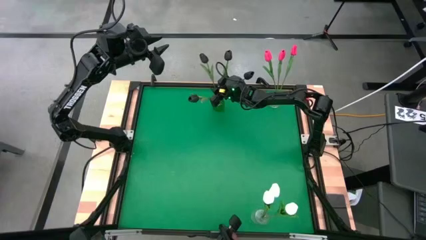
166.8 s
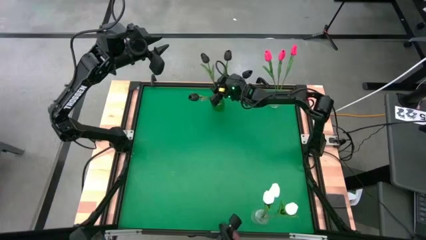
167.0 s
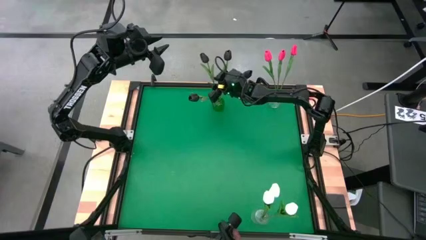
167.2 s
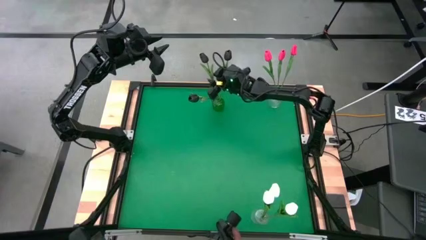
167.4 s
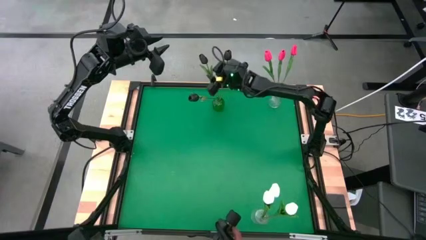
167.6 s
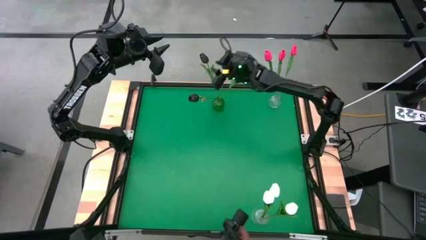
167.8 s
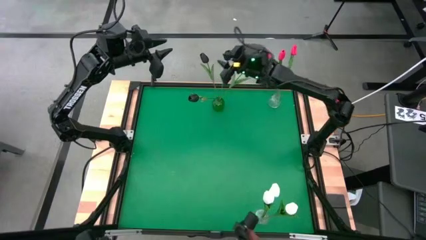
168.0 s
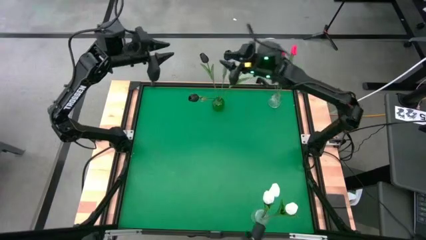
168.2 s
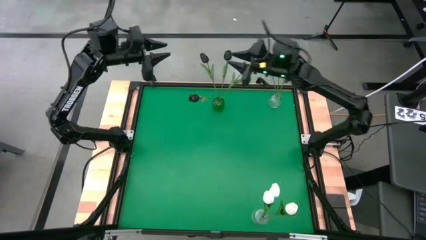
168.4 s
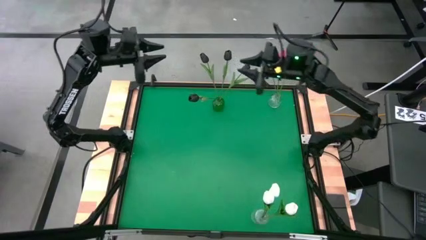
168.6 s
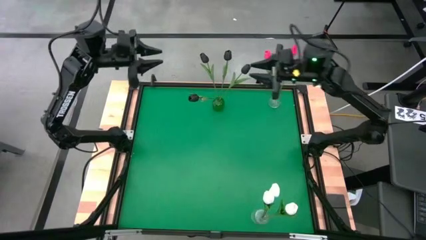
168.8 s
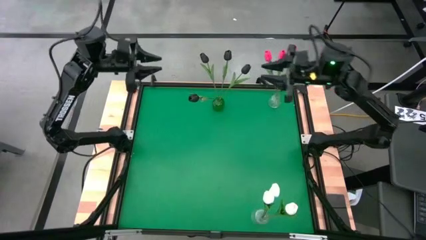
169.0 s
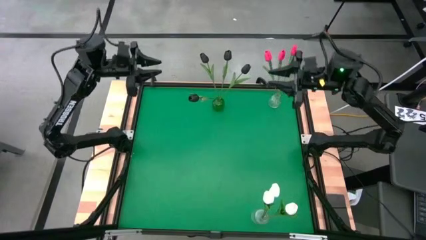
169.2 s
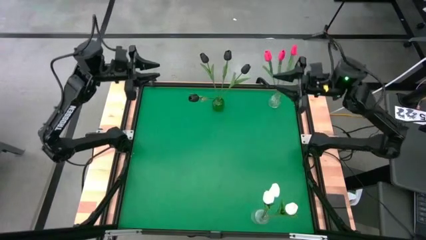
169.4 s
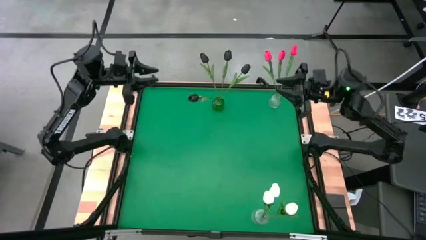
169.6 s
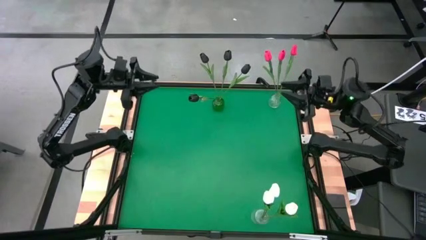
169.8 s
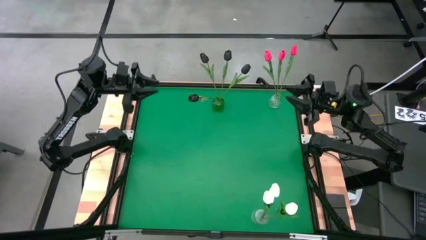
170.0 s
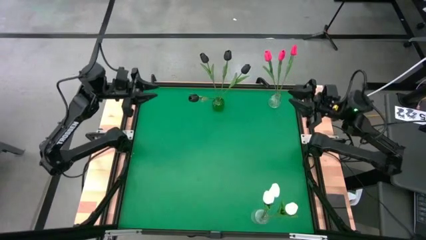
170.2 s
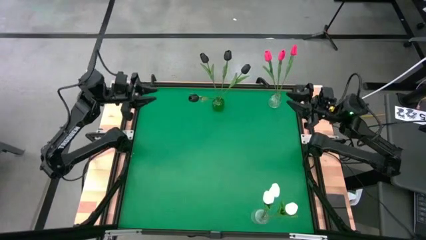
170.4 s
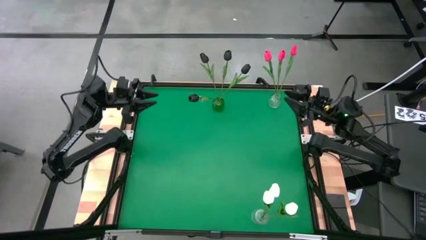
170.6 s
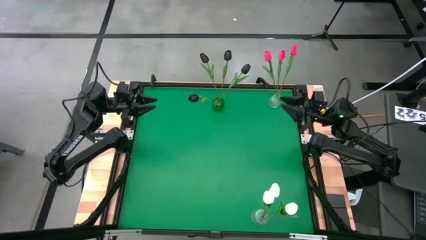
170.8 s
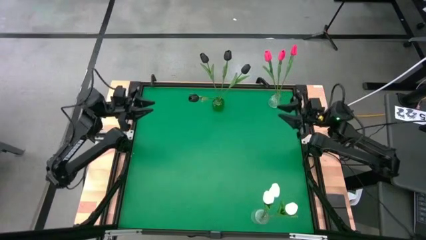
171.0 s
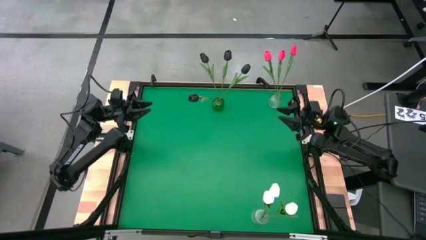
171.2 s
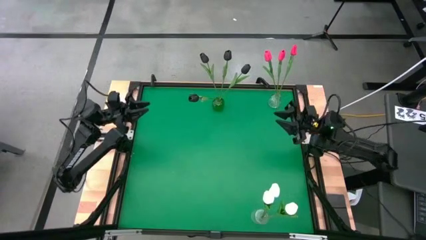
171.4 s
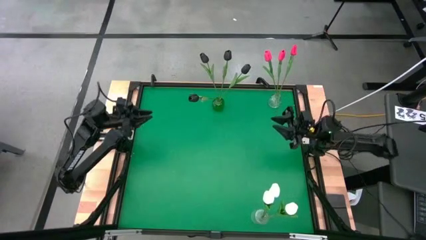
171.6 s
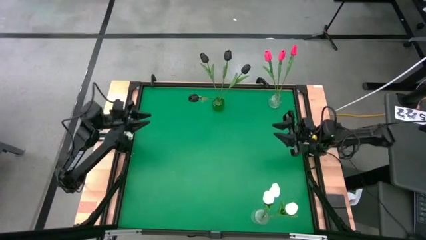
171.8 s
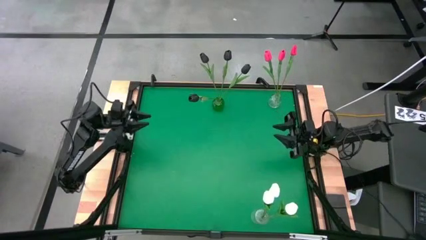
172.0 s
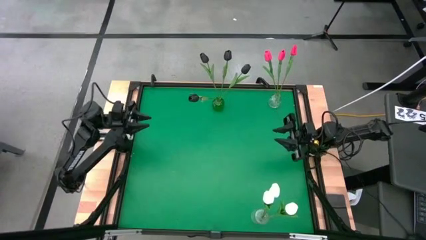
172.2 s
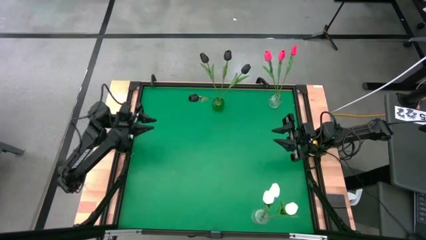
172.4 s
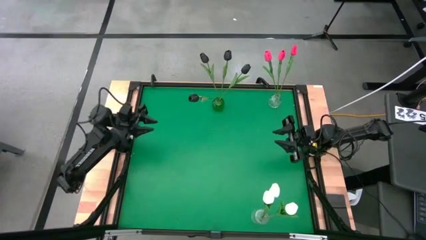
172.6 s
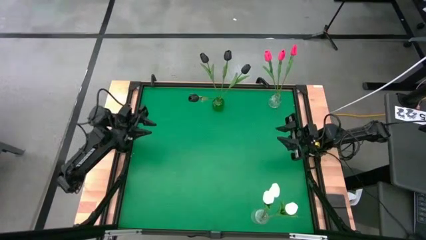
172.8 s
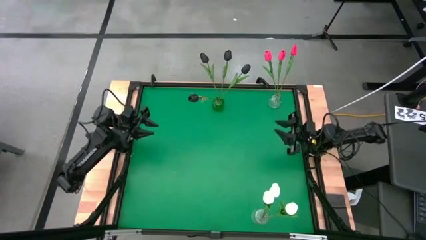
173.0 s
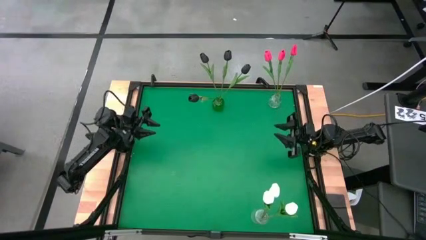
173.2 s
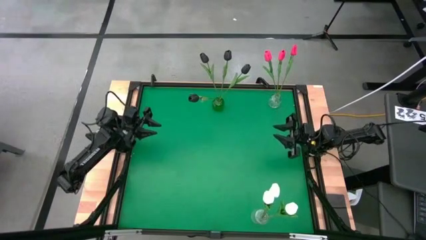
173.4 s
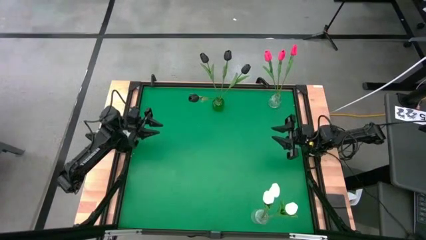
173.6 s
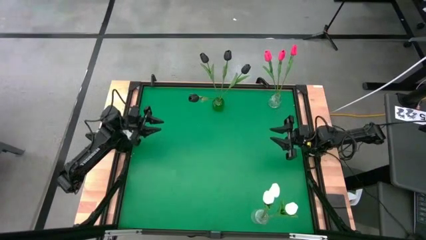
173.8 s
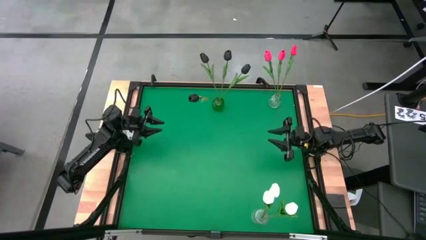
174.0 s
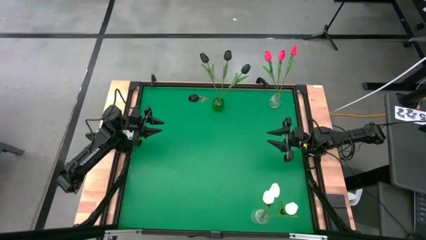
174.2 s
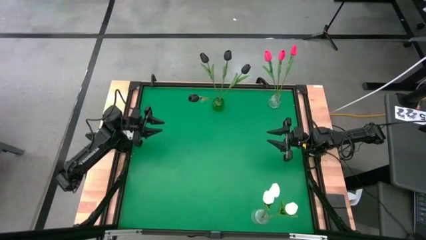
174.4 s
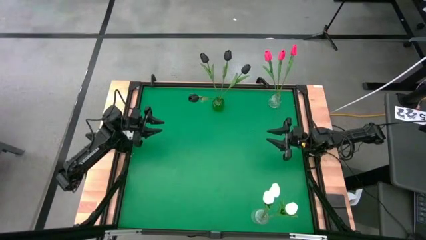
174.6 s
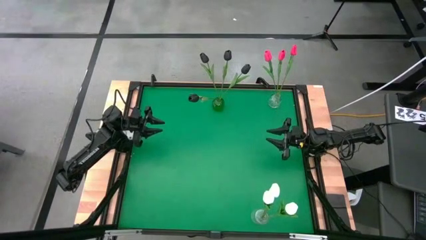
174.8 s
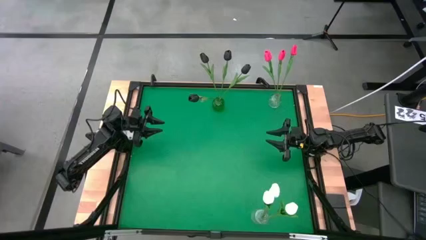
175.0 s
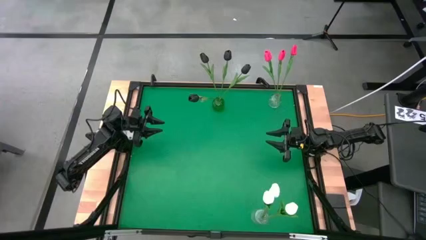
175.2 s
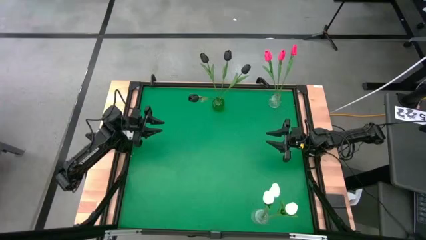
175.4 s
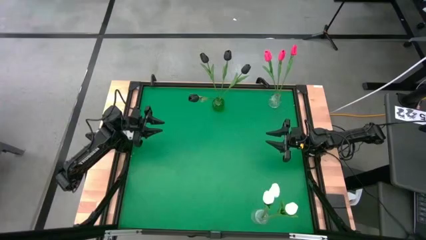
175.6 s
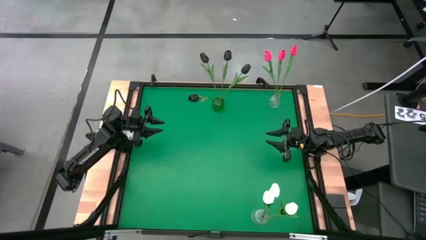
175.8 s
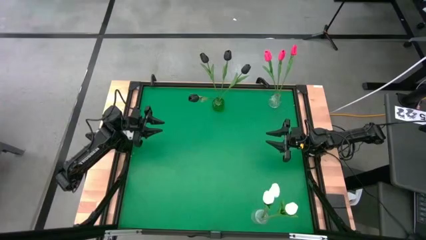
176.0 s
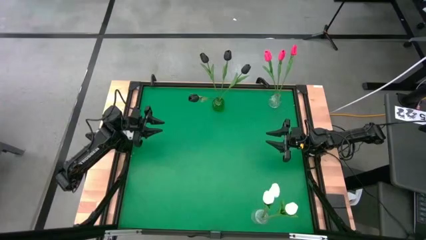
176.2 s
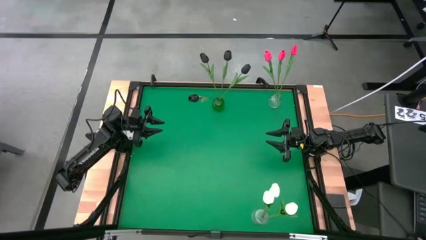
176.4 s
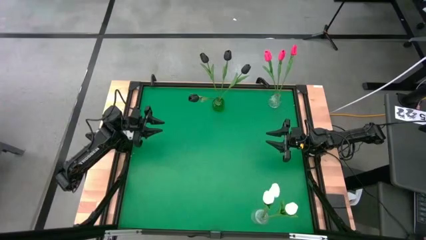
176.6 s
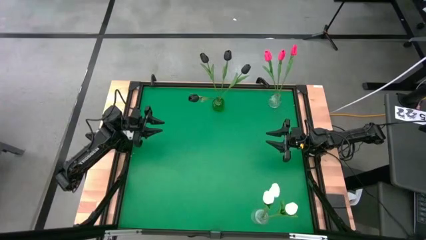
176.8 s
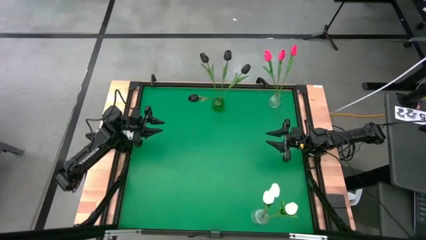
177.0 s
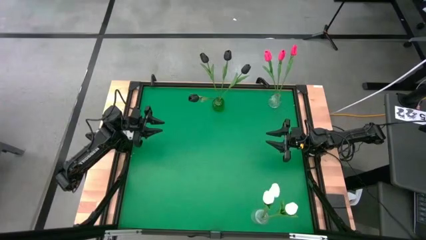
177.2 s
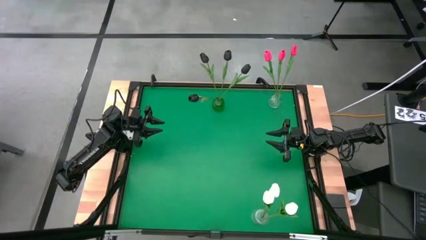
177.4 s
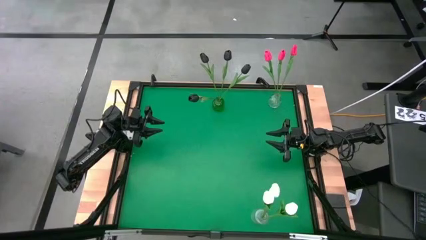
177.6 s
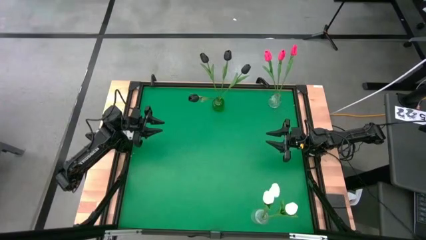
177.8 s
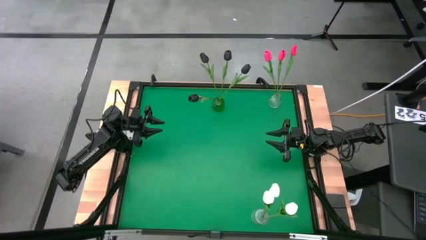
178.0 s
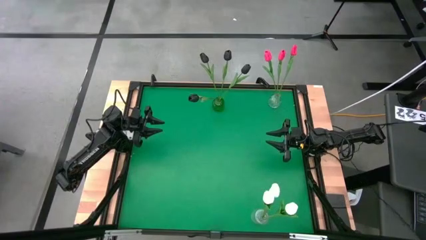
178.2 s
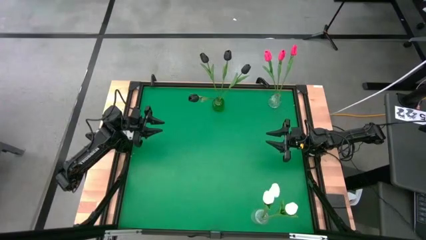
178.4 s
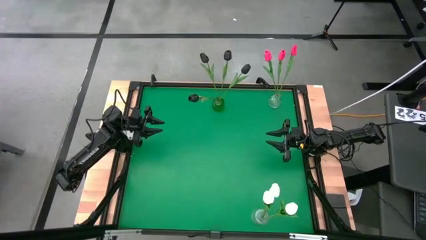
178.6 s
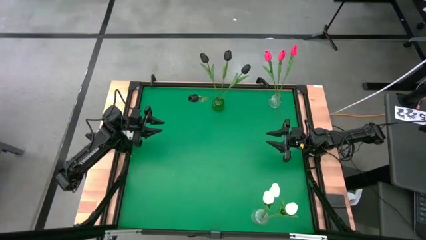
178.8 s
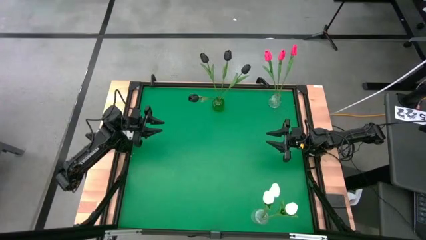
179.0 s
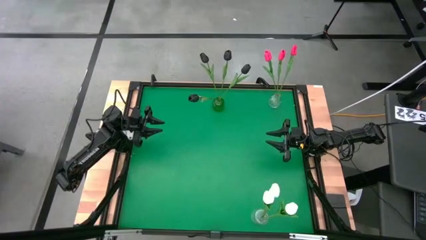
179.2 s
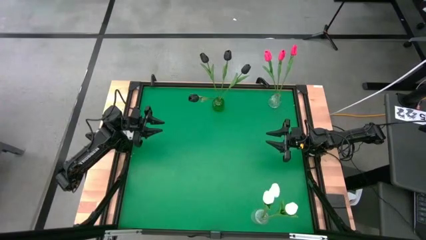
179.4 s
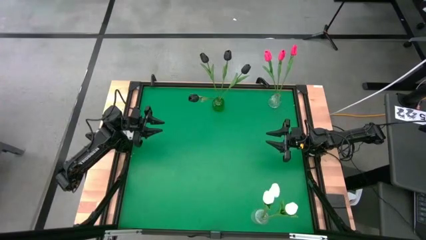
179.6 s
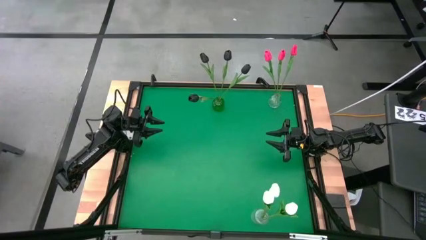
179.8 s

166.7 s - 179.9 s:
Task: Sort flowers into vase by color
Return to Home Position

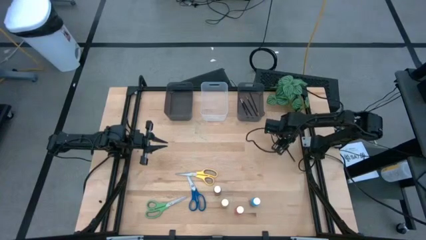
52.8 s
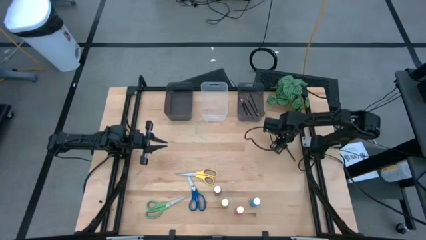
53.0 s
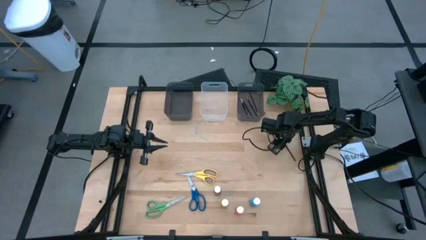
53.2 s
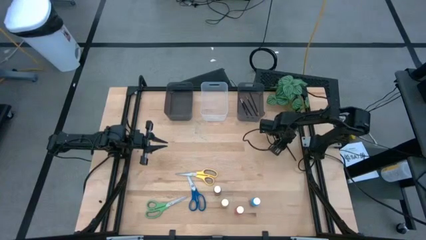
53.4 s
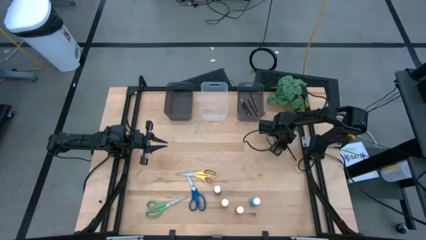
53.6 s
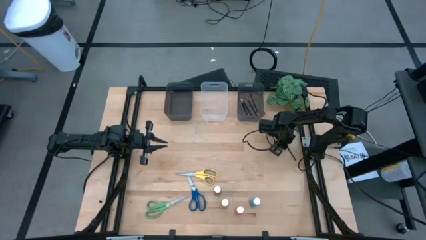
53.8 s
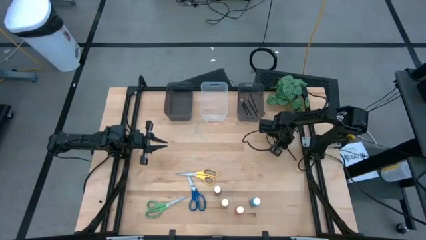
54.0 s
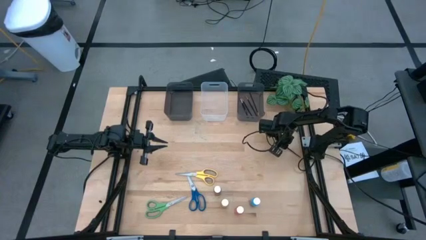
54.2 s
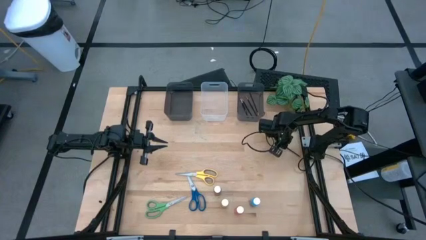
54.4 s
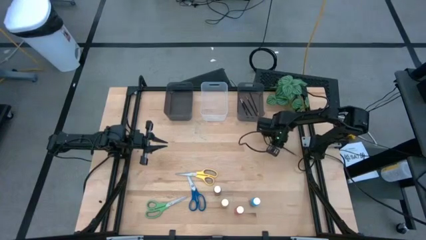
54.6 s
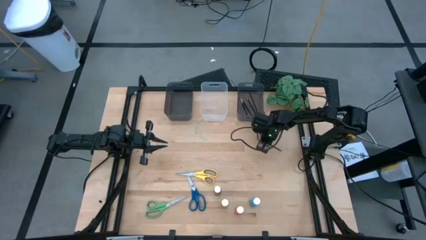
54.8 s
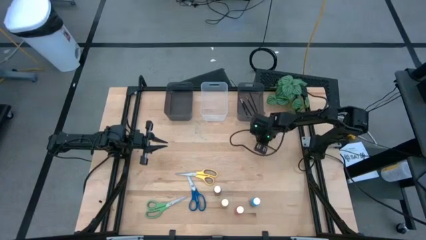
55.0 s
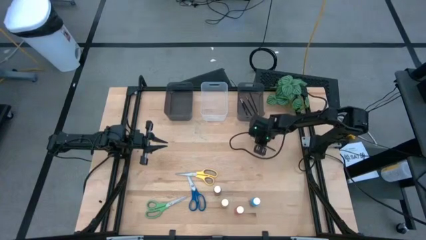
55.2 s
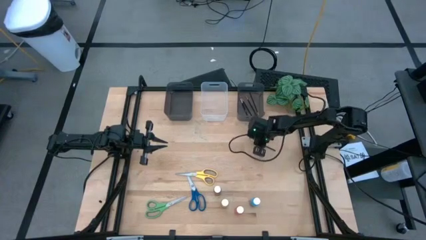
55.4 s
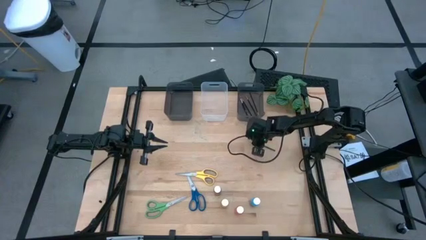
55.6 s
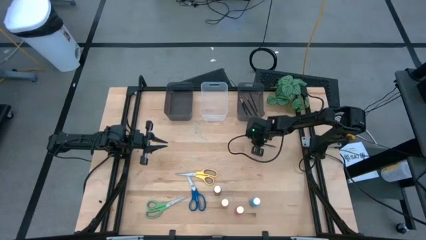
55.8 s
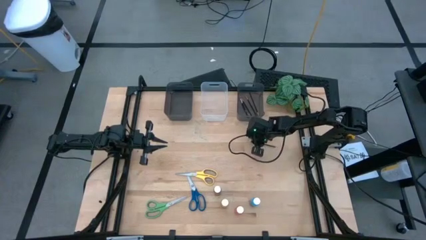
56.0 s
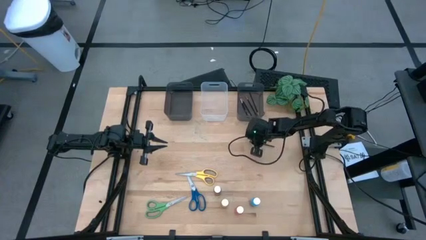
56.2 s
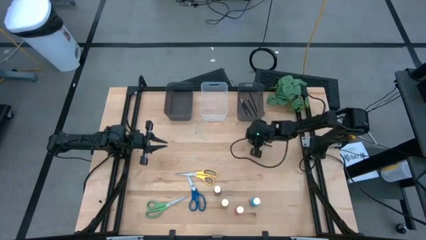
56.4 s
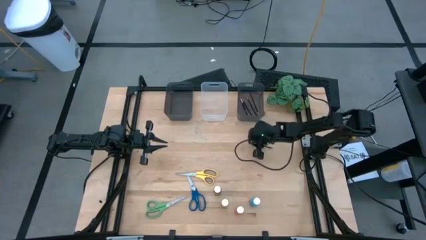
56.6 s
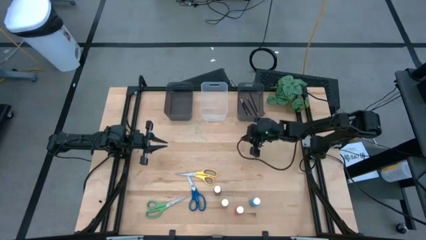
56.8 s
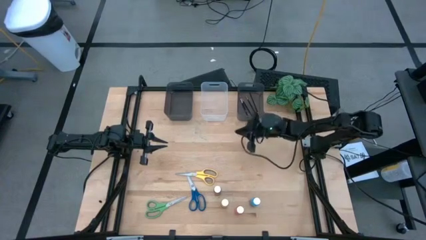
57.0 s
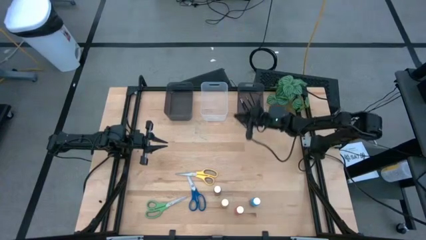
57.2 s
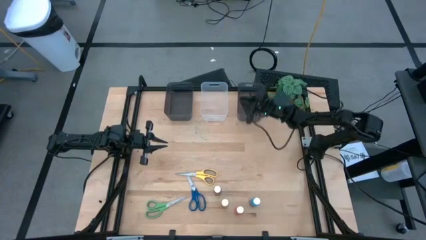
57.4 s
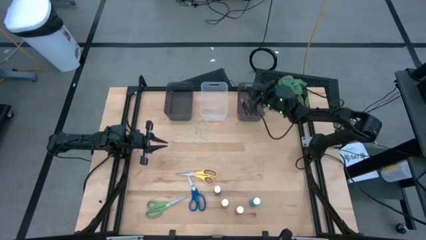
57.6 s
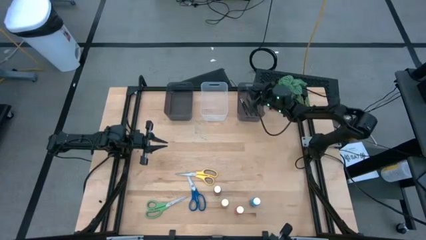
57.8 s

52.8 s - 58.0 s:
Task: Pick & Place Paint Supplies
Put the black paintbrush into the right black bin
